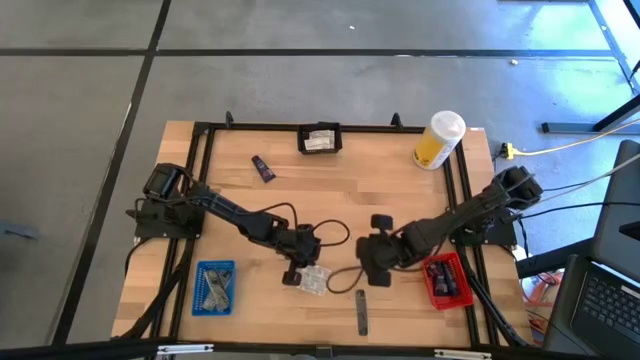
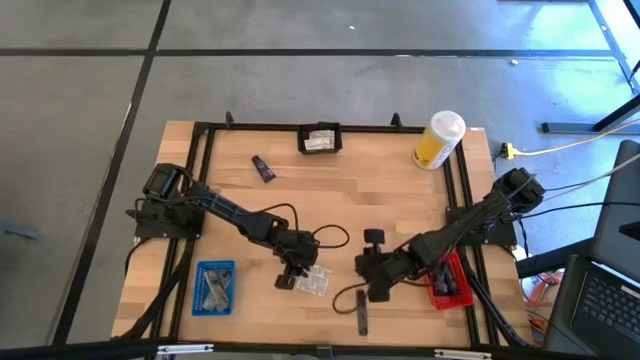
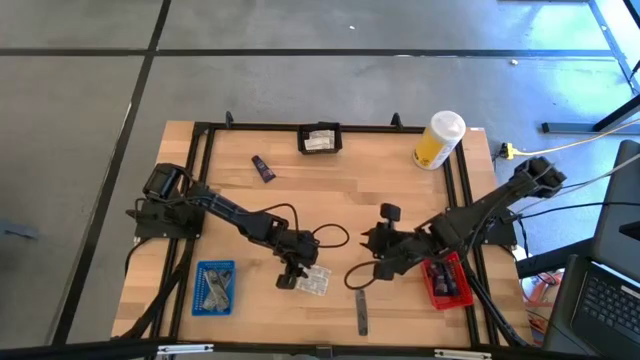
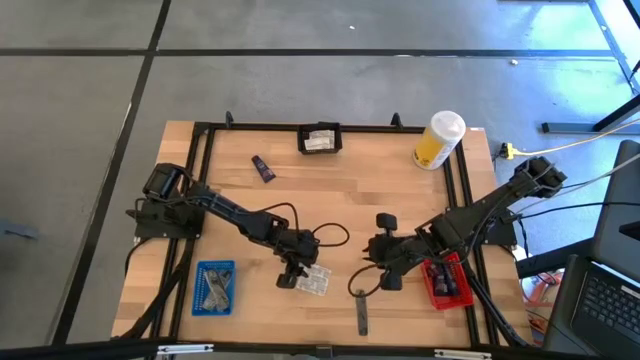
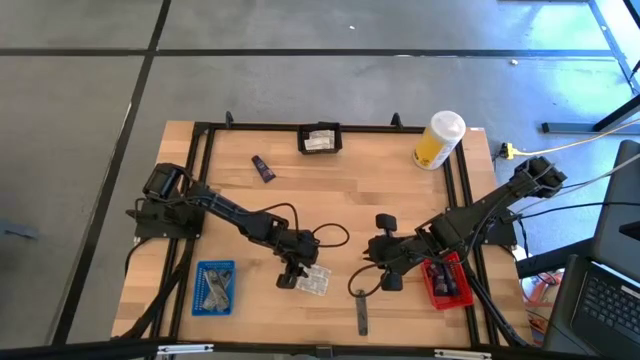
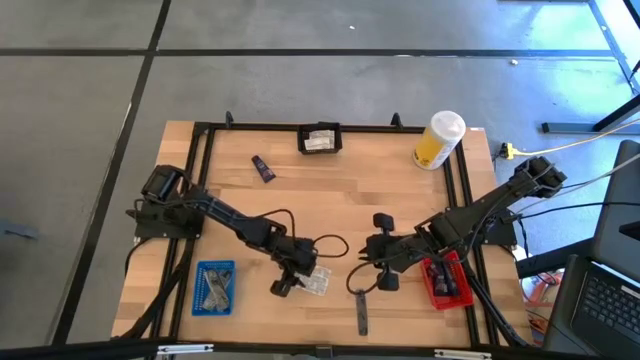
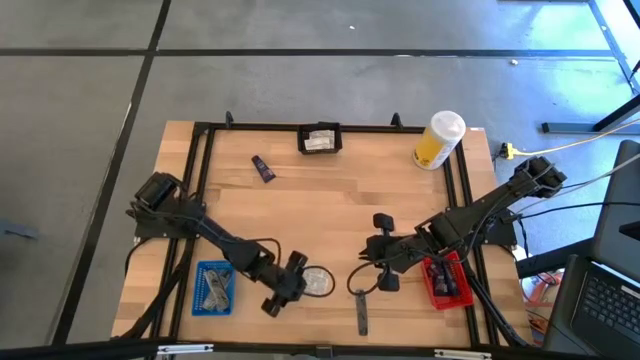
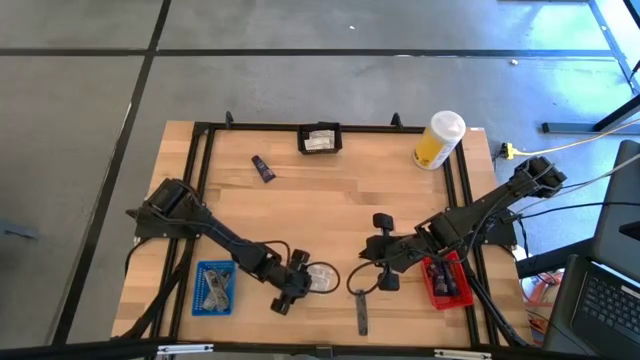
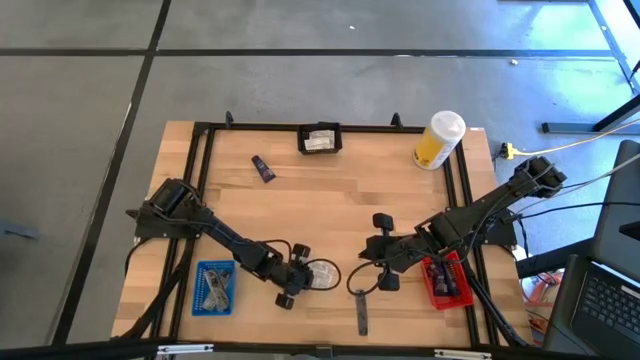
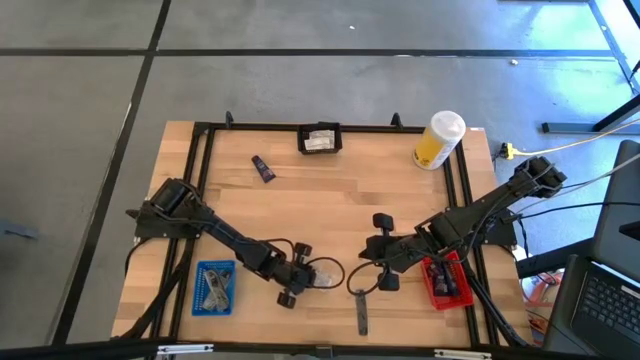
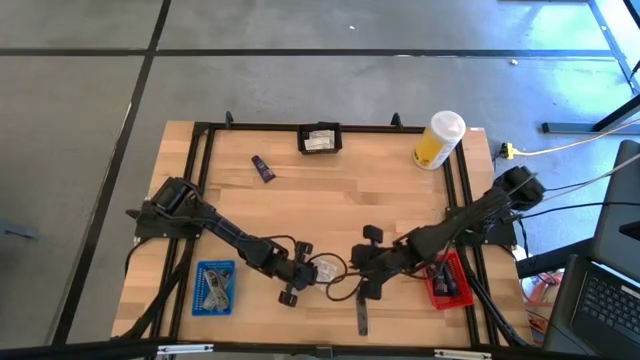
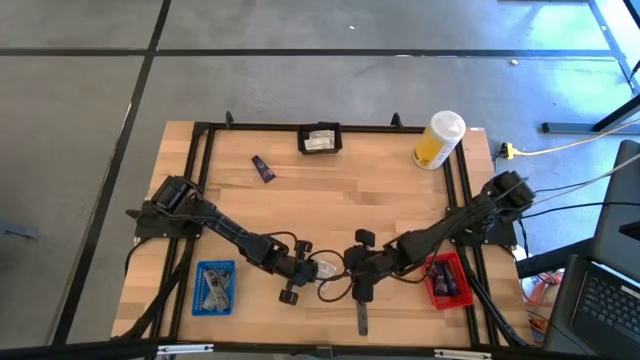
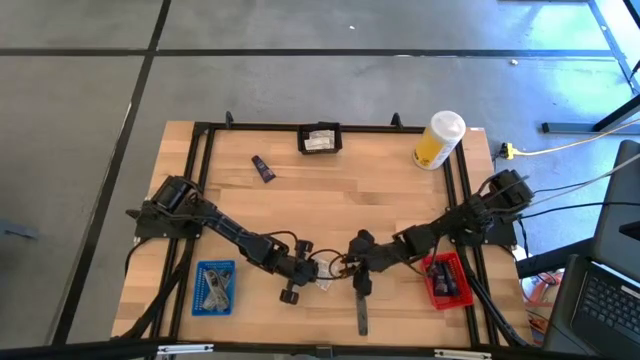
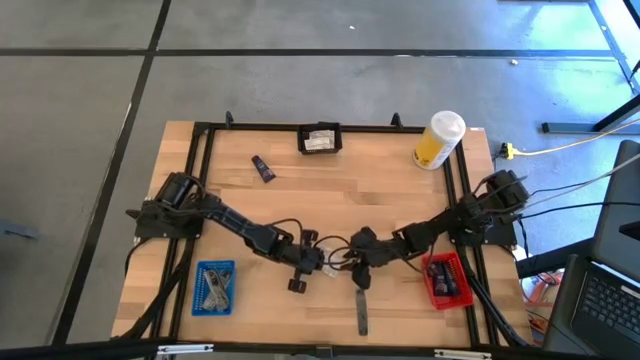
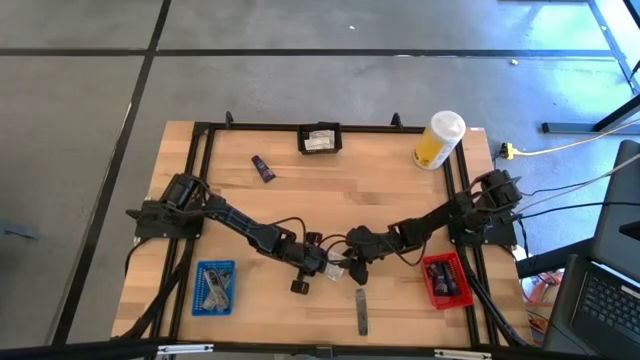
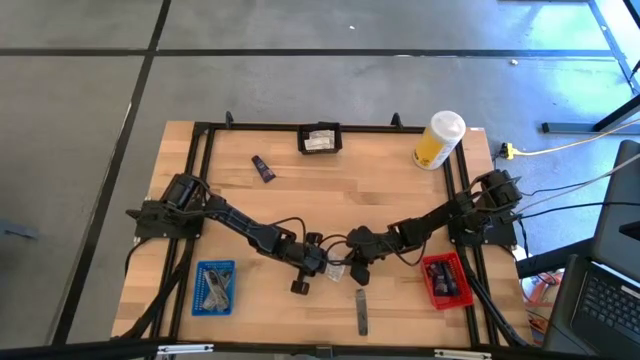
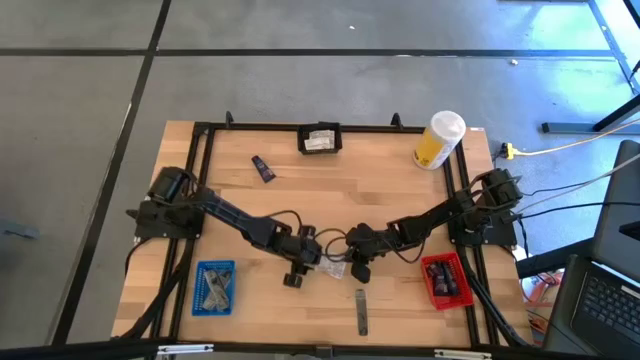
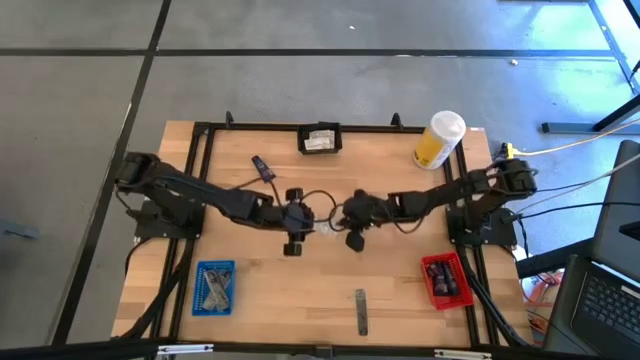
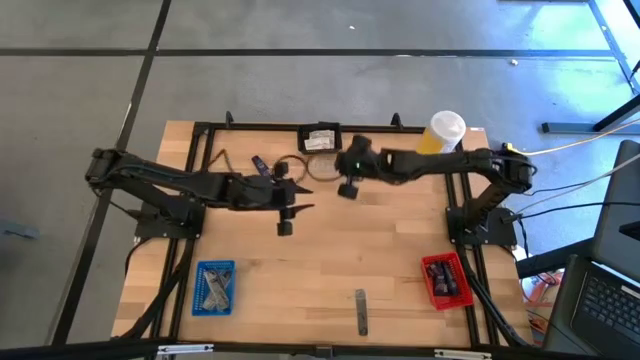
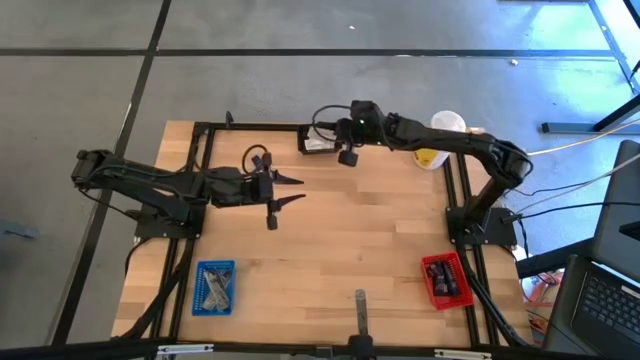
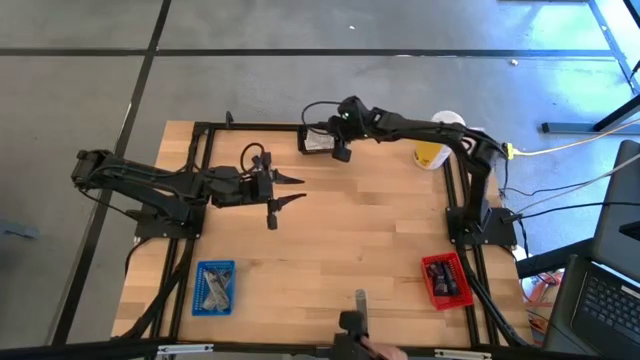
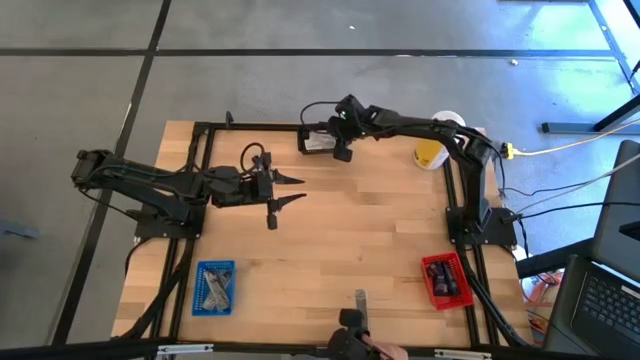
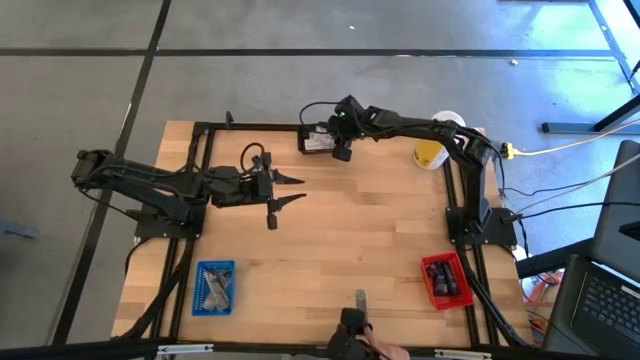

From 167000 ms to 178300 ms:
Task: Pick & Place Travel size toiletries
Put the white bandage into the black bin

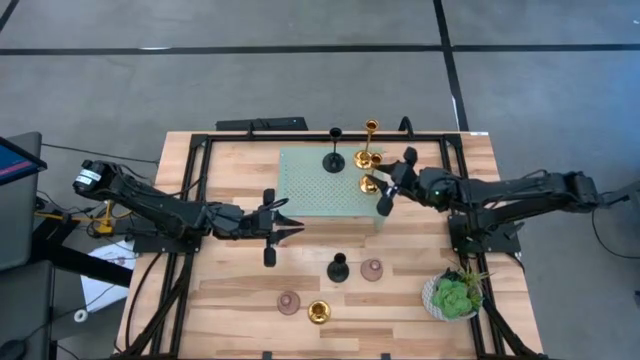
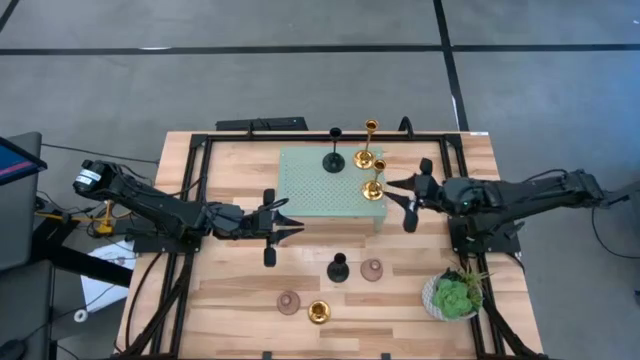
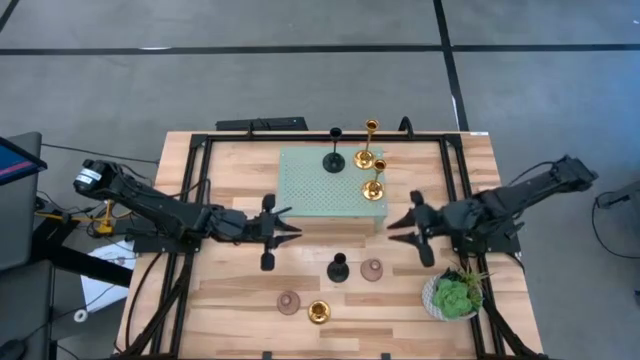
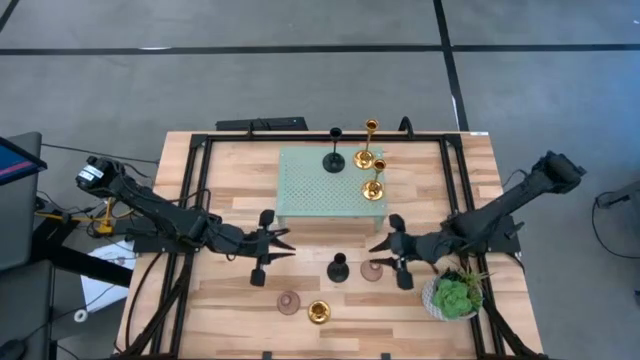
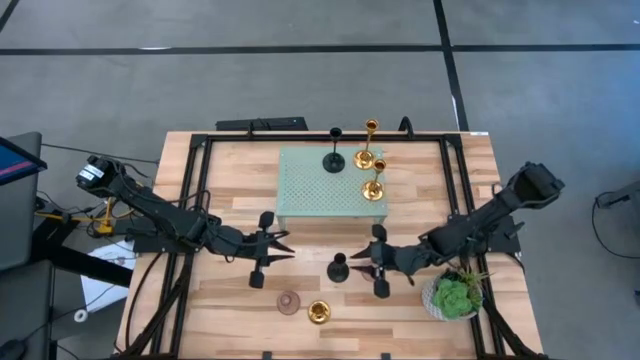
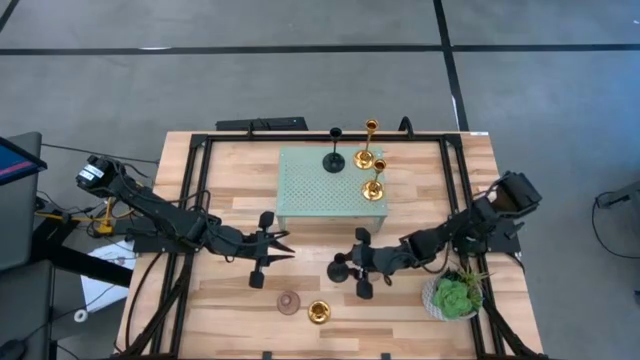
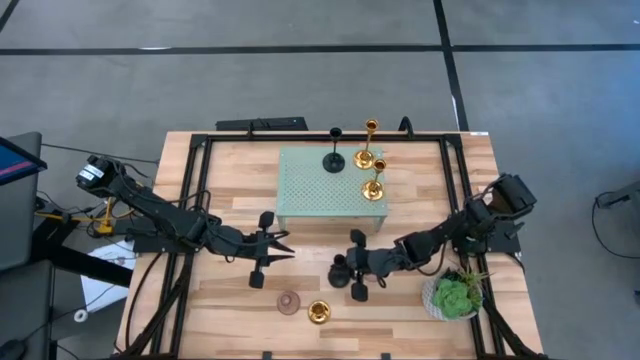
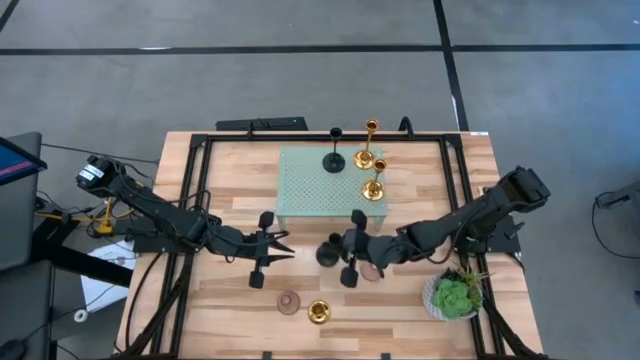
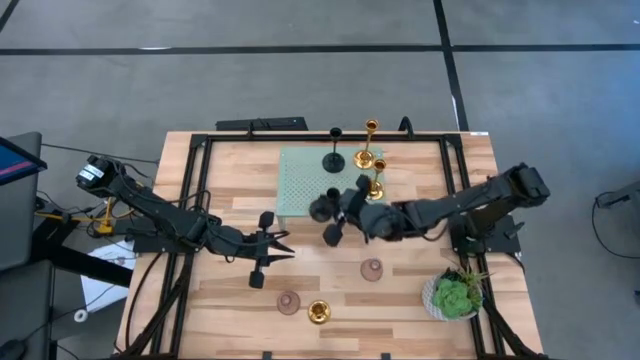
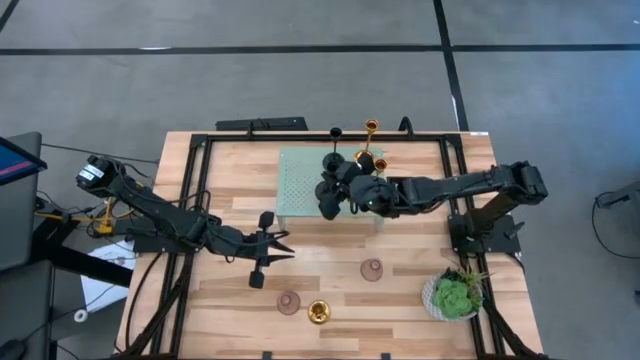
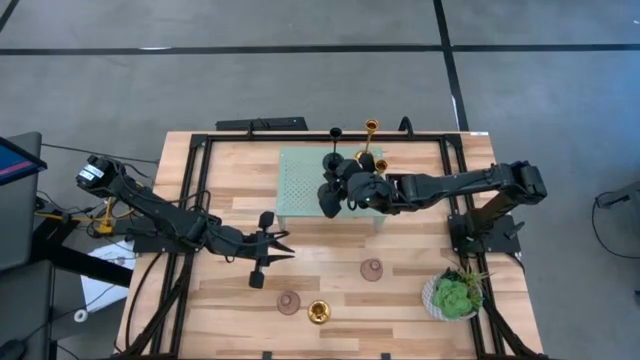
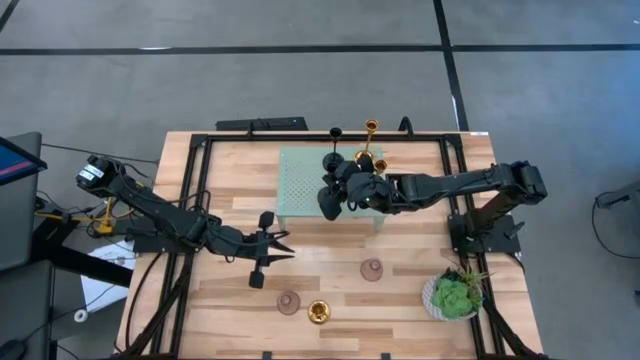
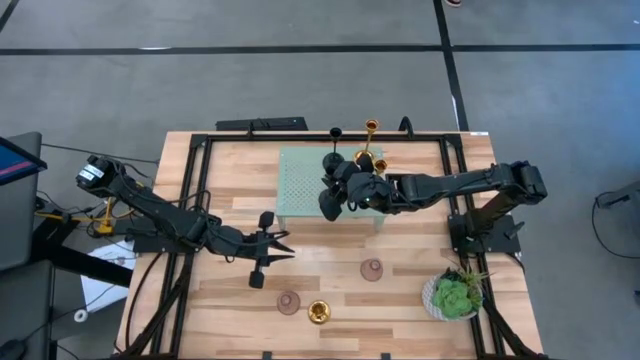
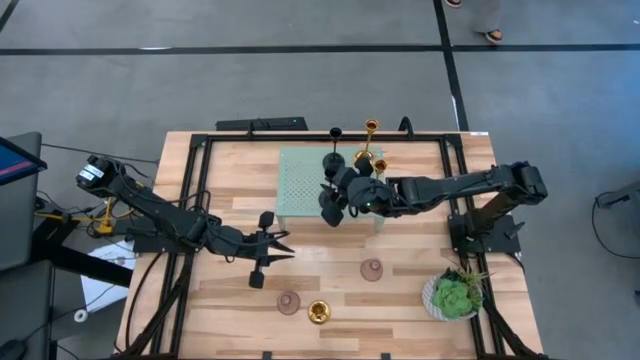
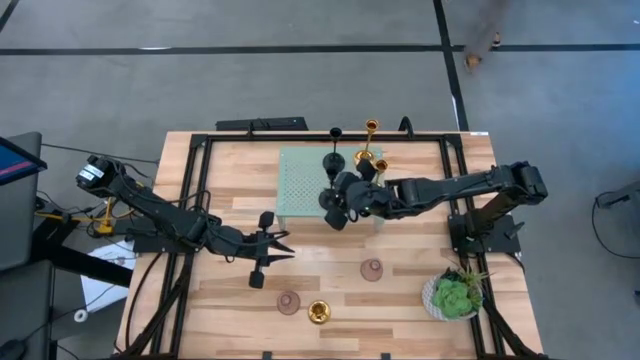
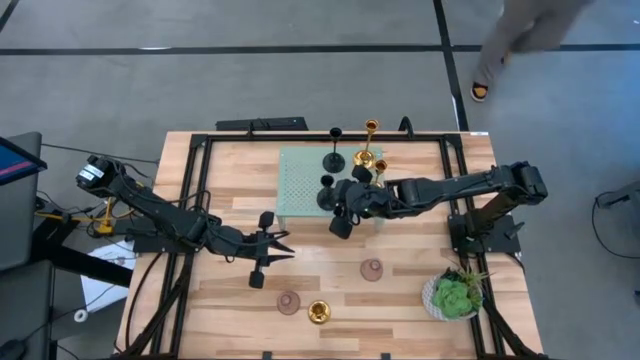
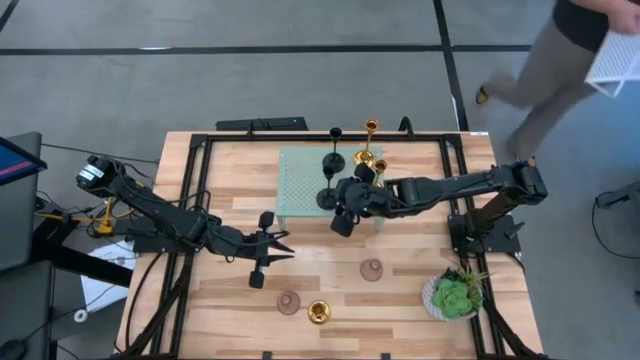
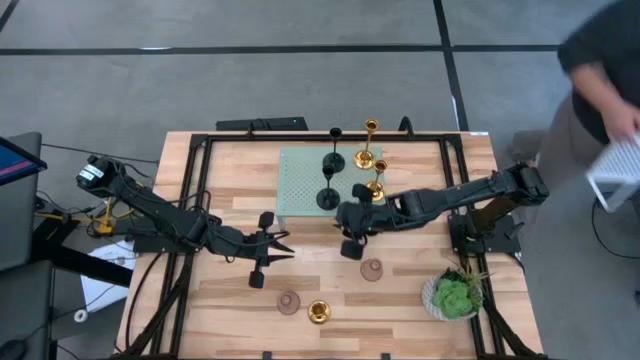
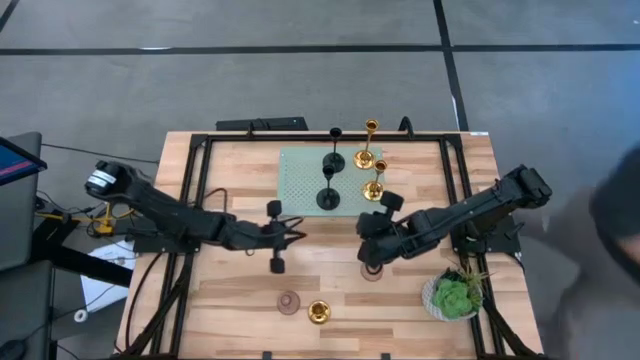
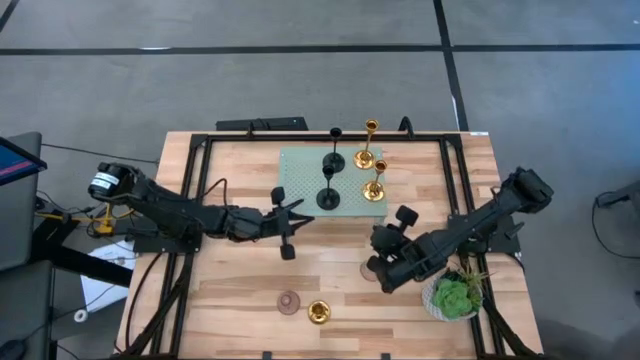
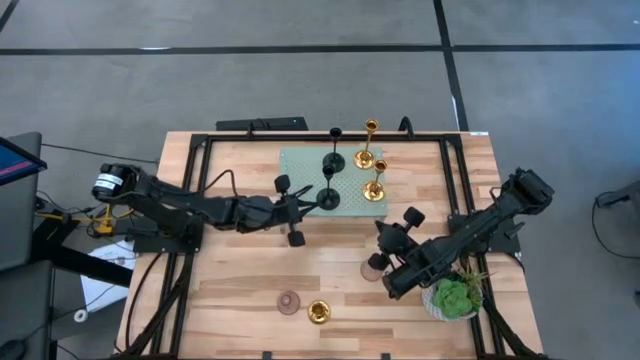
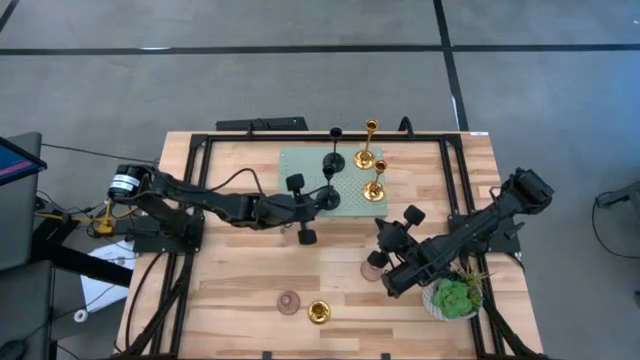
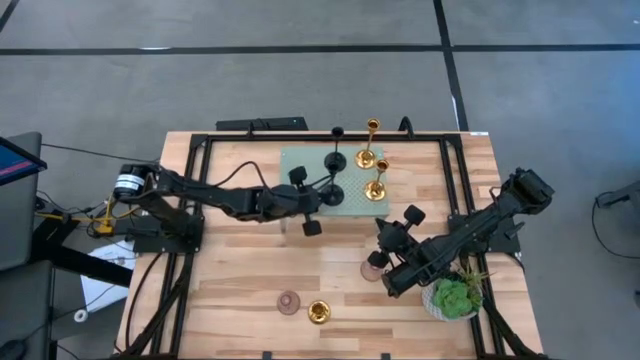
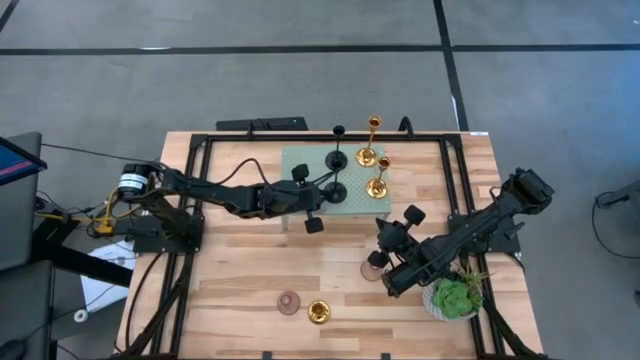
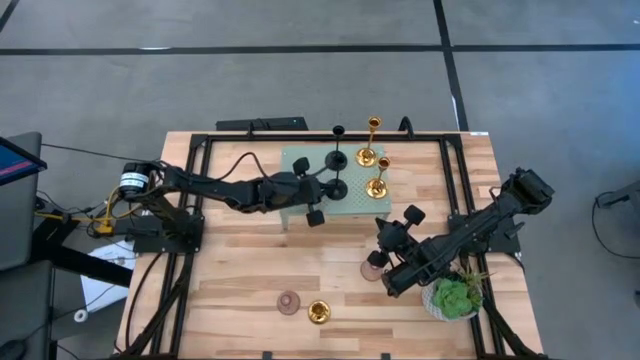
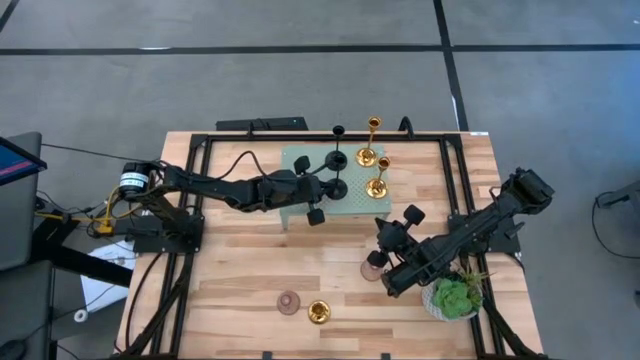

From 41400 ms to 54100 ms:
Task: Pick & Place candle stick holders
Put the black candle holder on the shelf aligned with the other black candle holder
